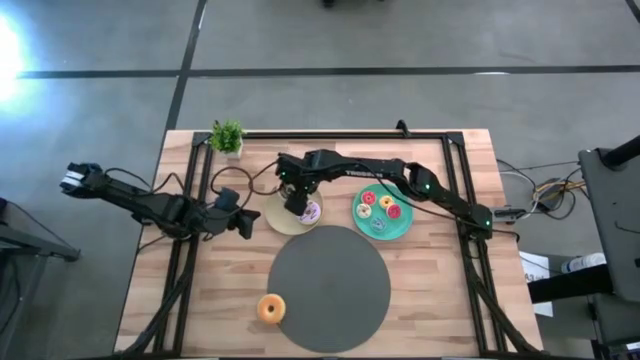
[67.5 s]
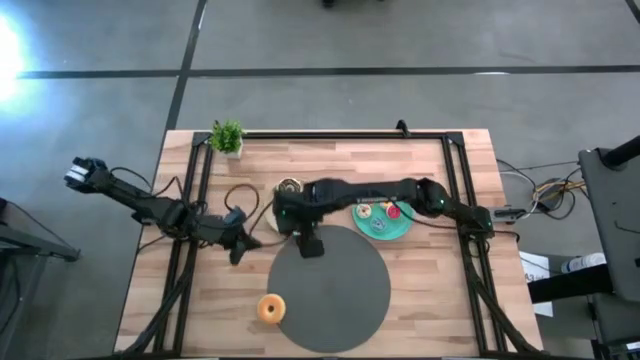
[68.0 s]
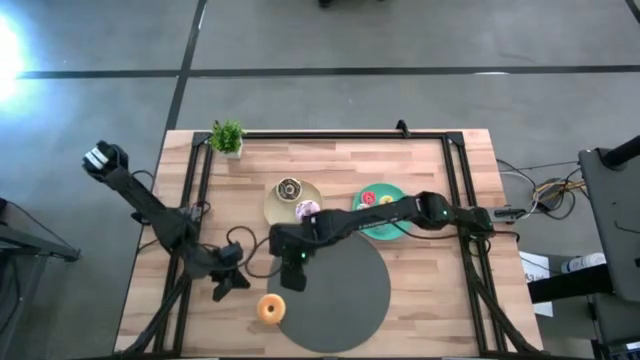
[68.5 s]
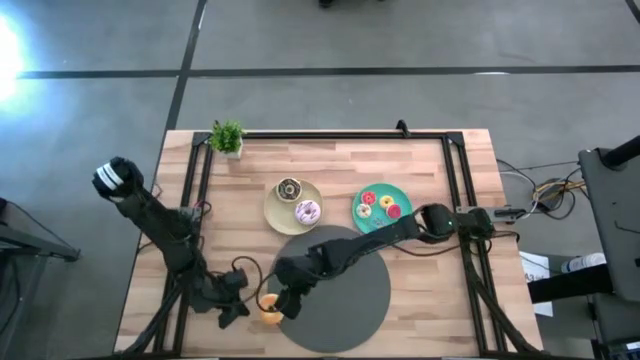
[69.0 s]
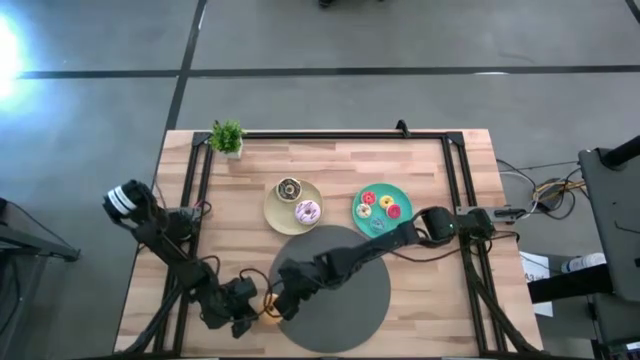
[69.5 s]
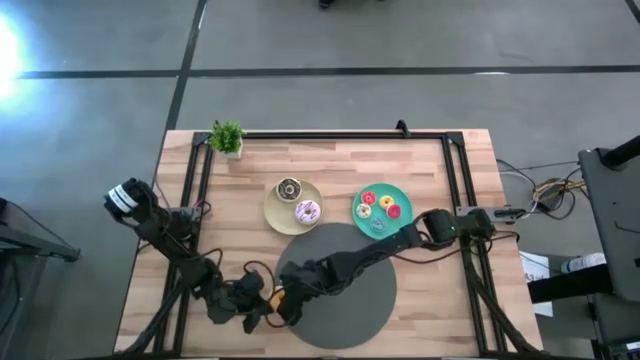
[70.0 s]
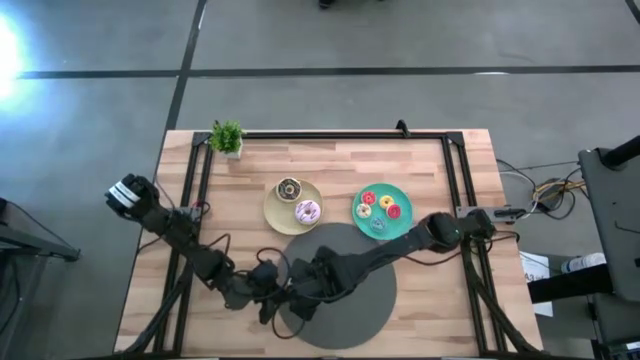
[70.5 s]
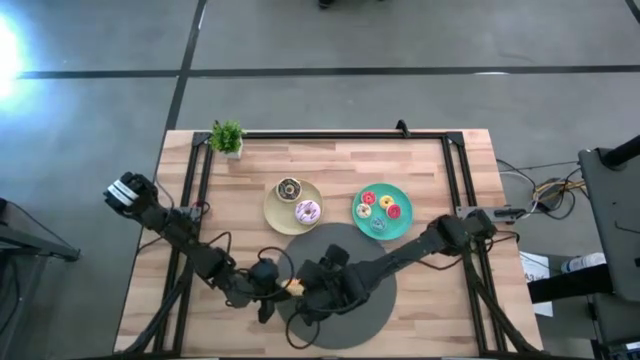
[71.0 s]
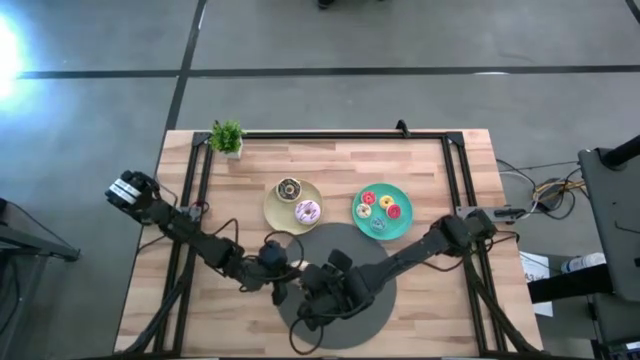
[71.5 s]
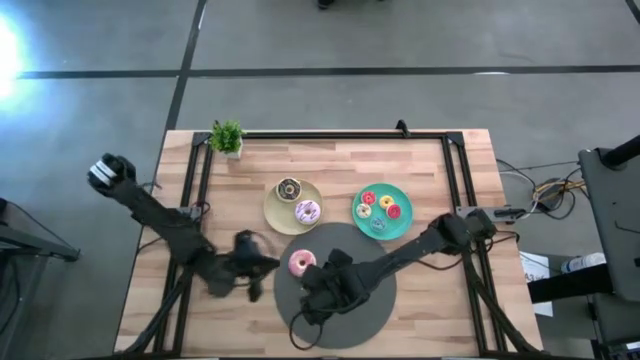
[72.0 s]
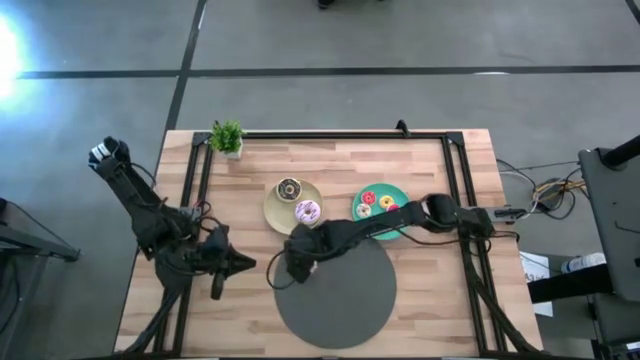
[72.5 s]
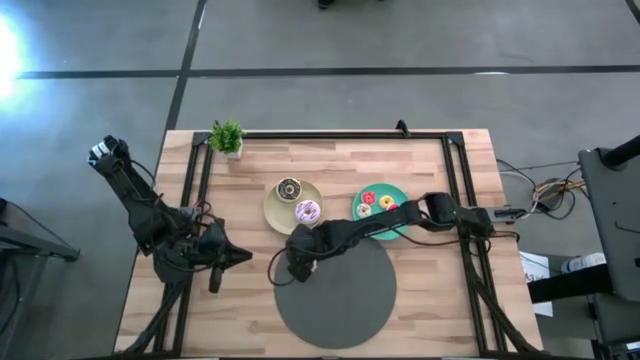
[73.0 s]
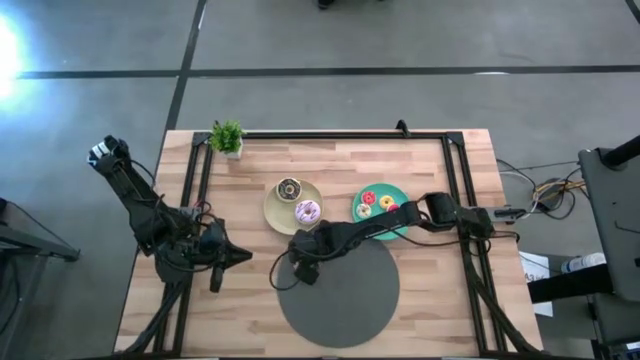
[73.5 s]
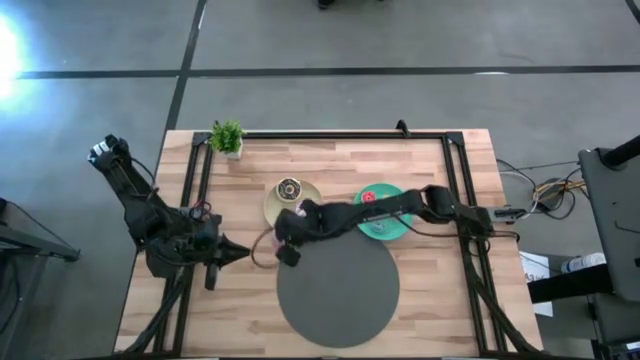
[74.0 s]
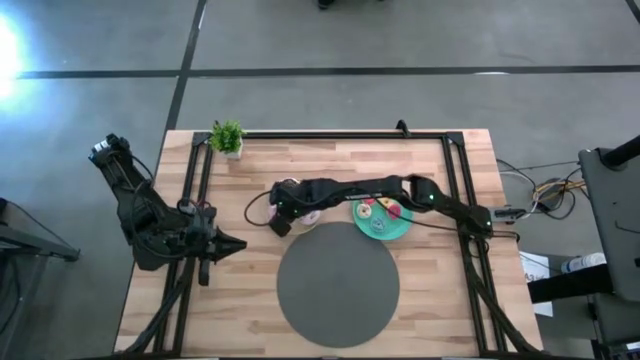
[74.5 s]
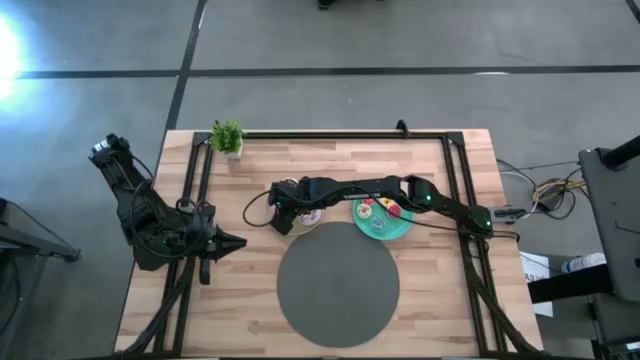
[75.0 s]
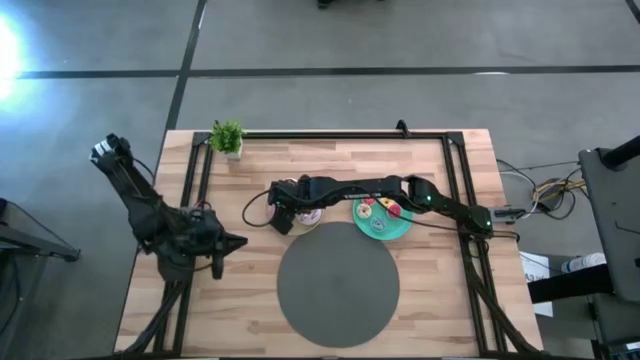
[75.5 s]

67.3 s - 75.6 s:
Task: Pick & Place donuts
Put the big pink donut on the gray plate

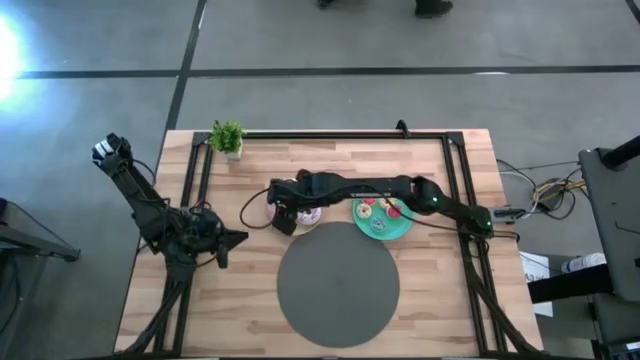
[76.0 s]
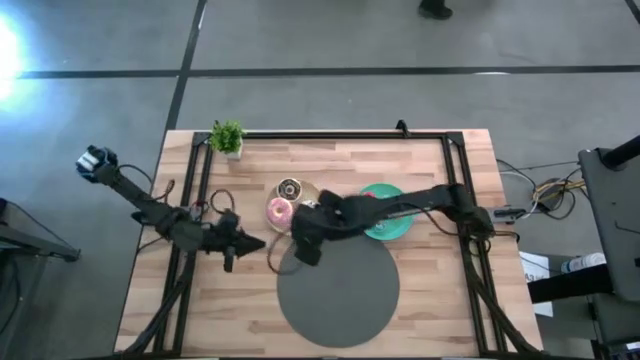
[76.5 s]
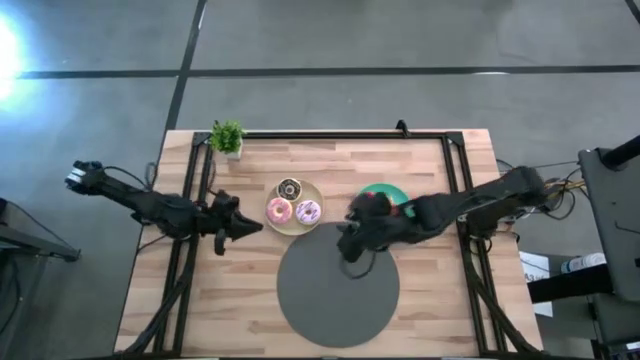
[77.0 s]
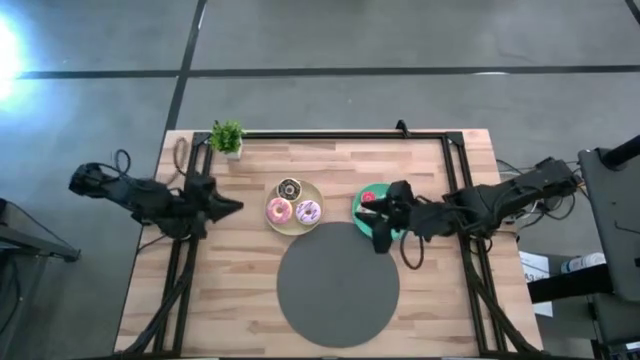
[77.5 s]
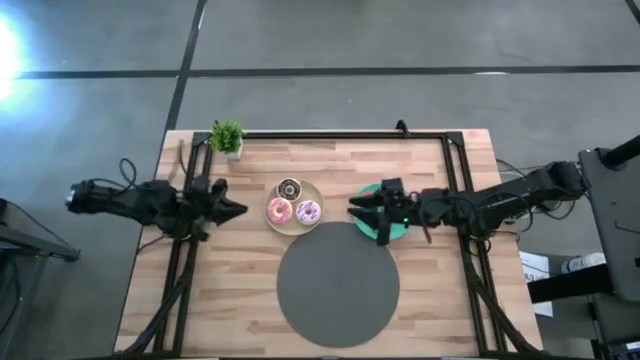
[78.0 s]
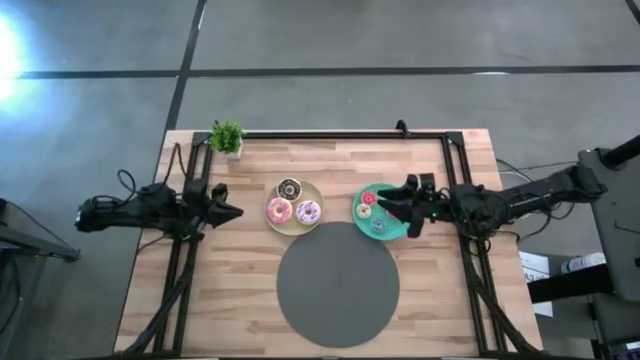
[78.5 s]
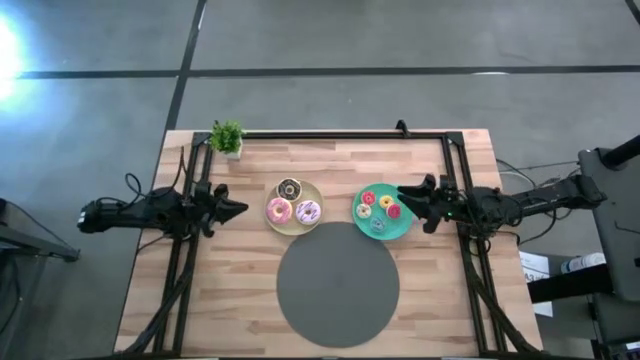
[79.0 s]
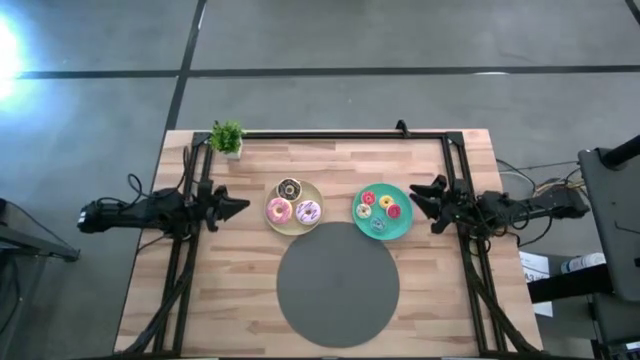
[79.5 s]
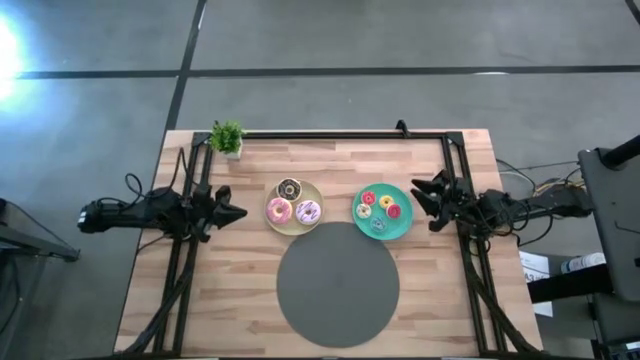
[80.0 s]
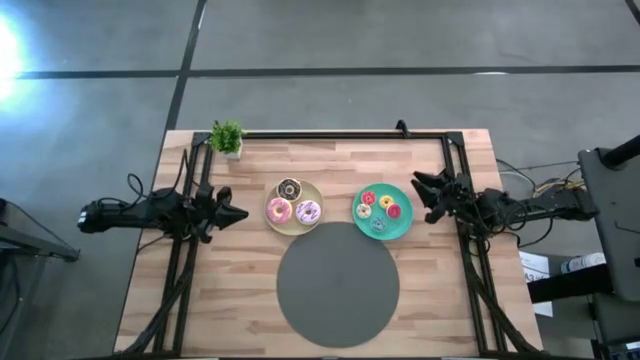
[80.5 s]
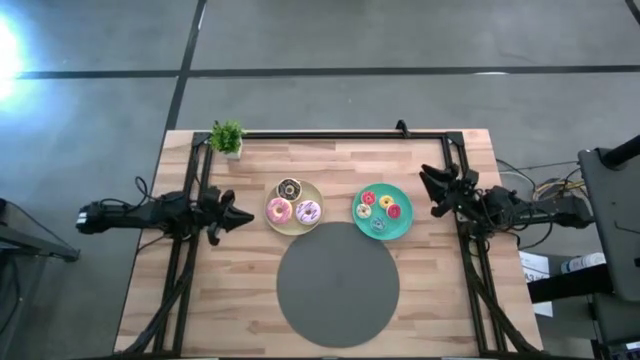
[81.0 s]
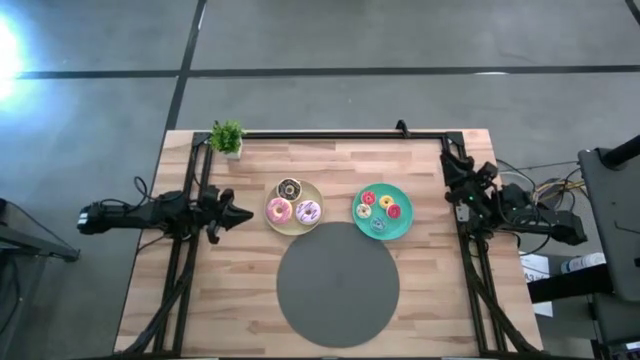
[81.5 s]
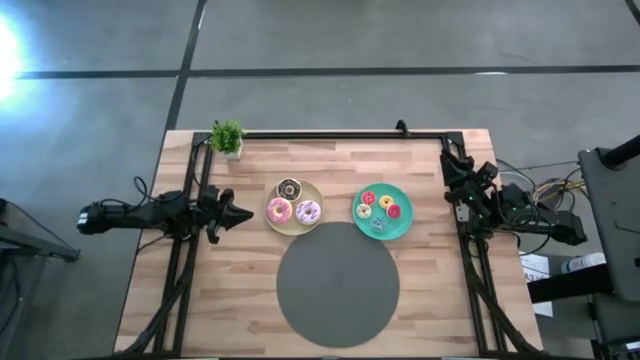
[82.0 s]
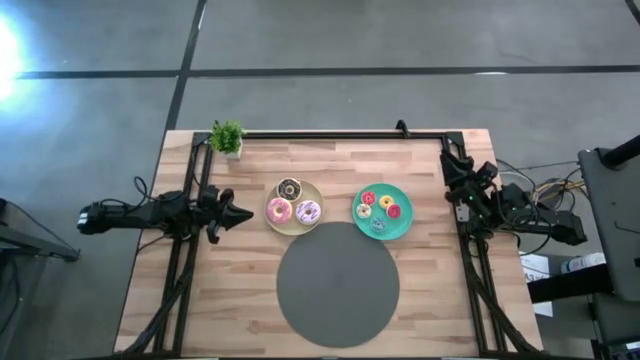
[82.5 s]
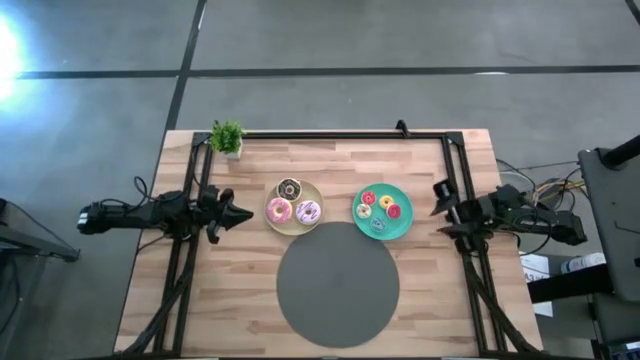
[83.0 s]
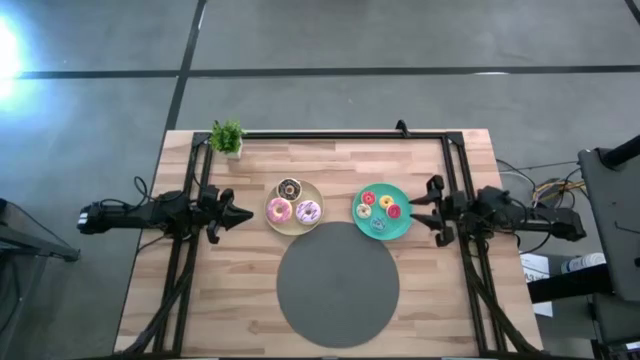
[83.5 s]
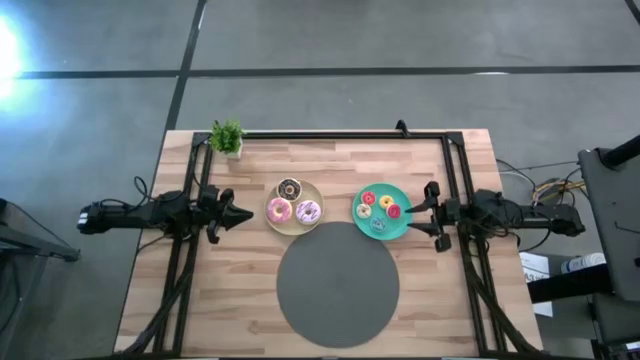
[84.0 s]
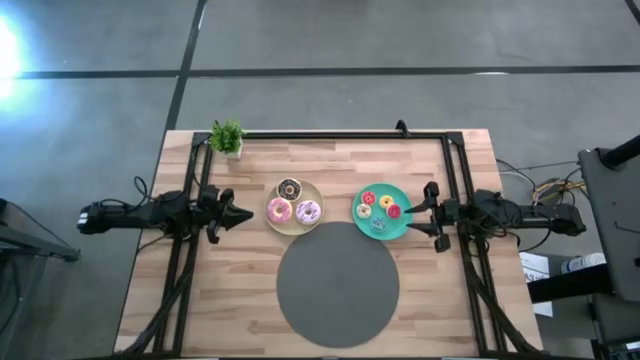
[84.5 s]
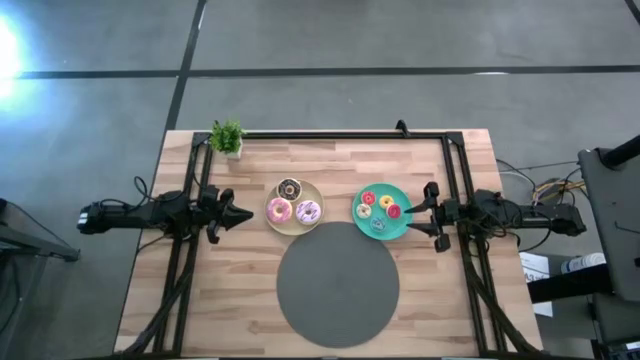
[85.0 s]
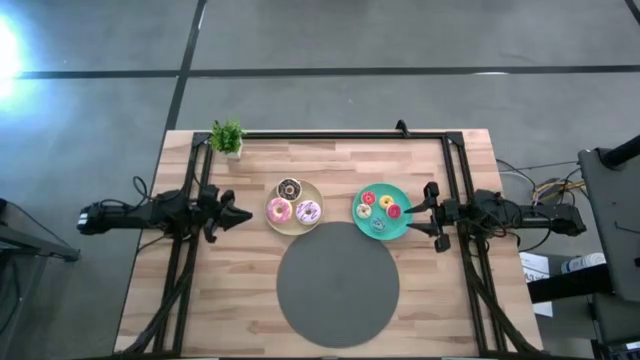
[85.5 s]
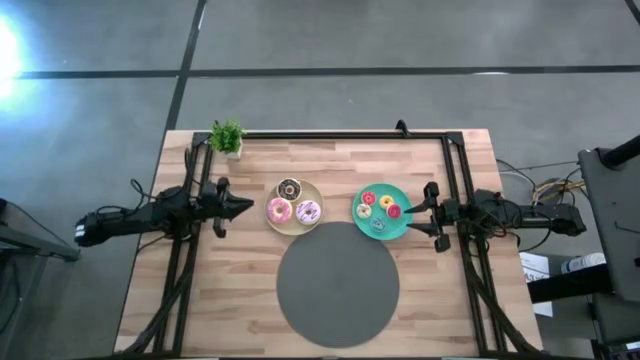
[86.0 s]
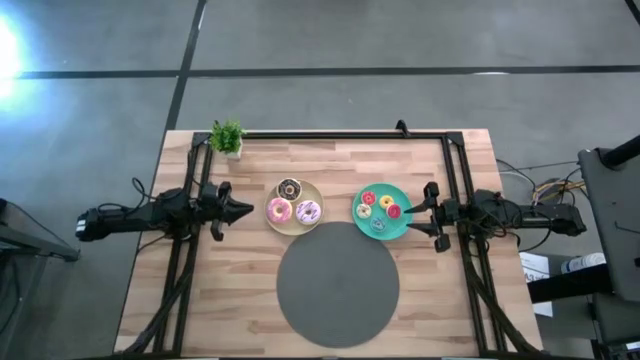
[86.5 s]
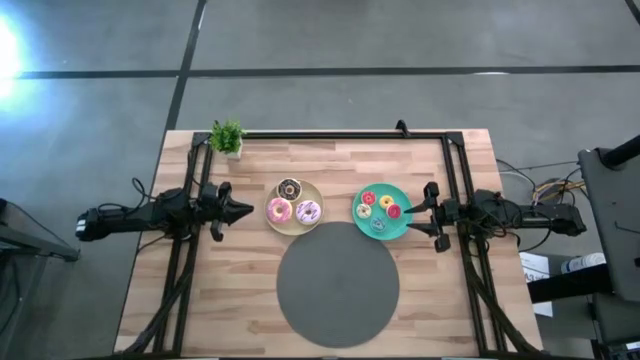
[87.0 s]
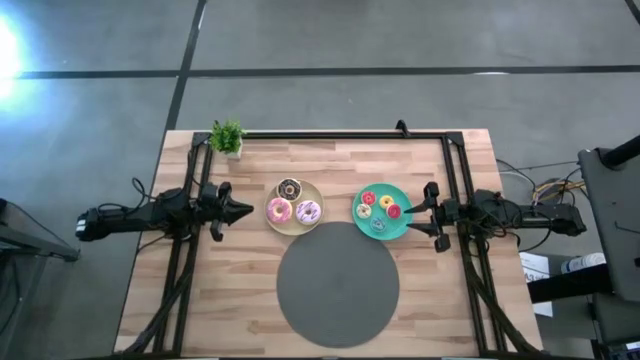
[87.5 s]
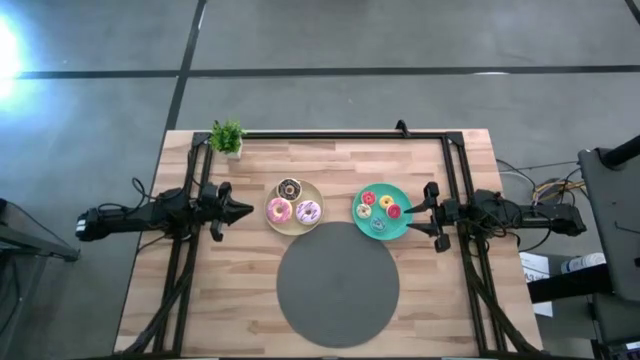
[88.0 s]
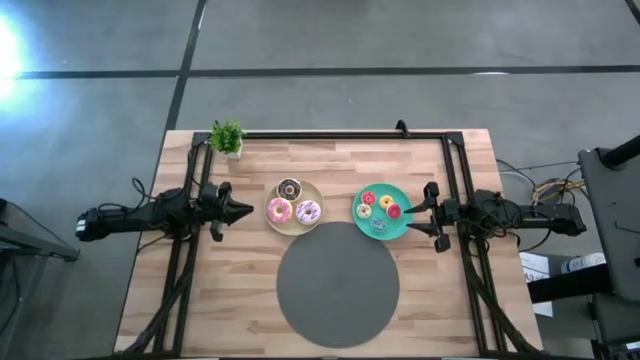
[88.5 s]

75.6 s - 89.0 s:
Return to Home Position
